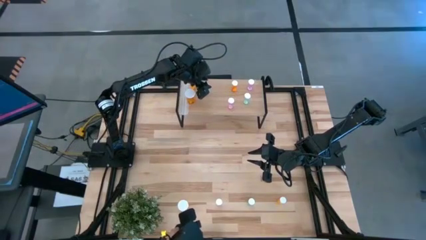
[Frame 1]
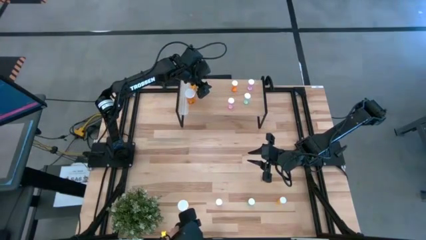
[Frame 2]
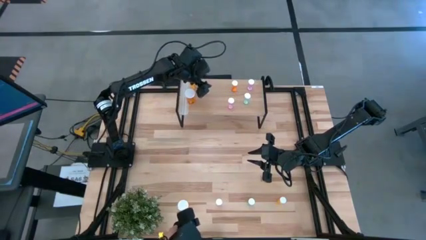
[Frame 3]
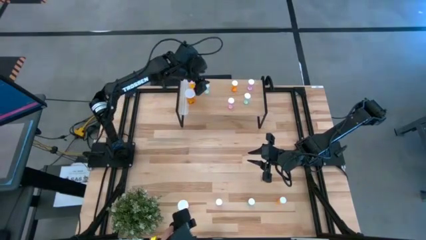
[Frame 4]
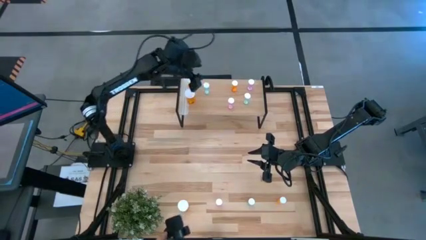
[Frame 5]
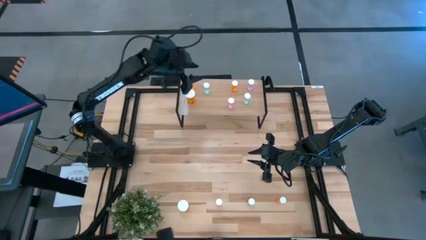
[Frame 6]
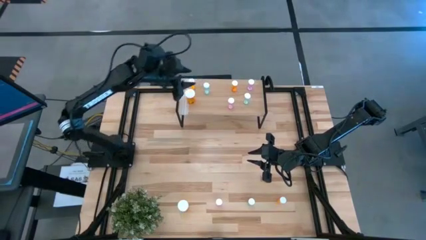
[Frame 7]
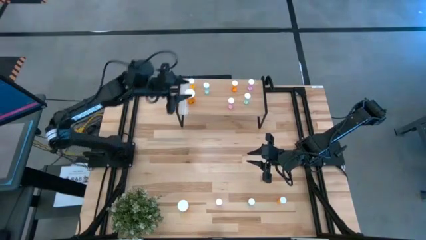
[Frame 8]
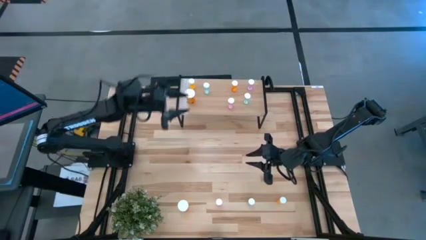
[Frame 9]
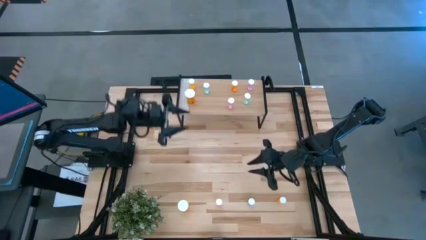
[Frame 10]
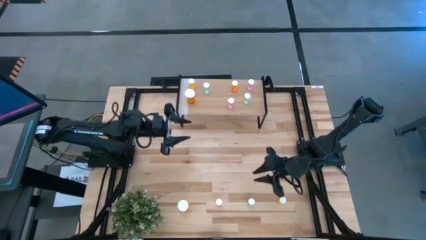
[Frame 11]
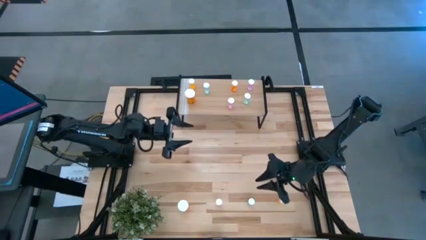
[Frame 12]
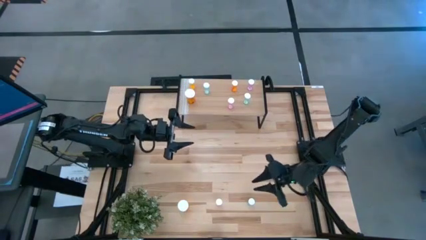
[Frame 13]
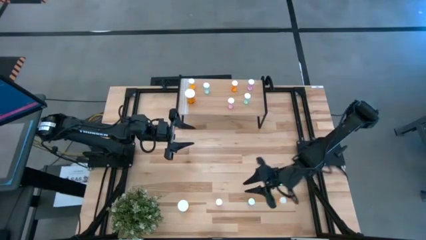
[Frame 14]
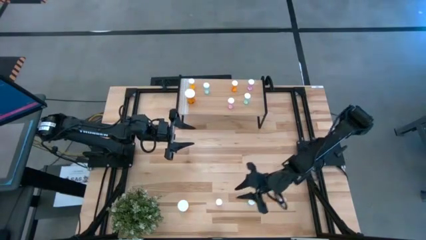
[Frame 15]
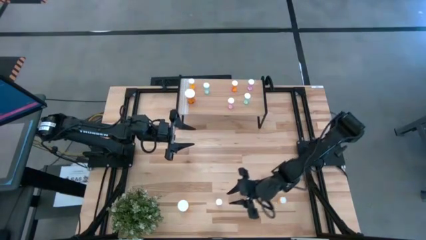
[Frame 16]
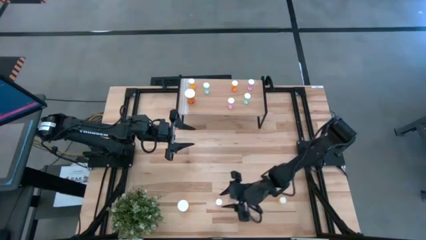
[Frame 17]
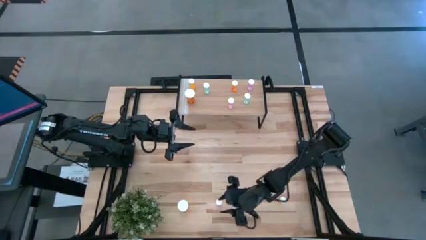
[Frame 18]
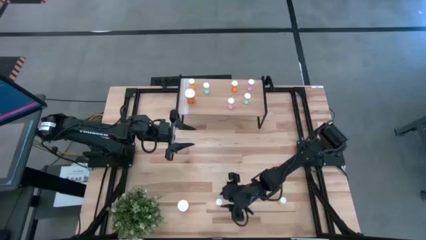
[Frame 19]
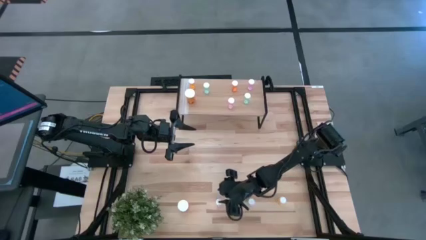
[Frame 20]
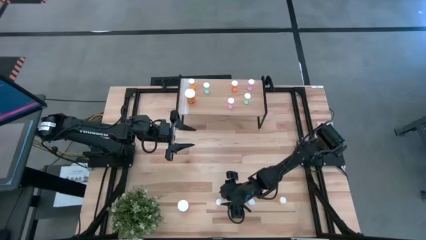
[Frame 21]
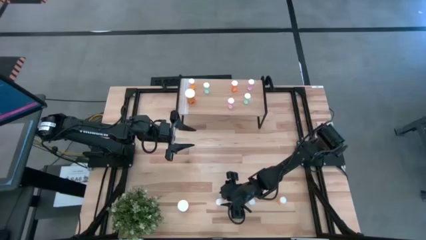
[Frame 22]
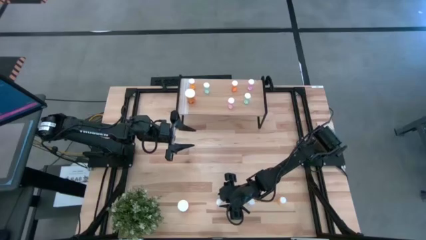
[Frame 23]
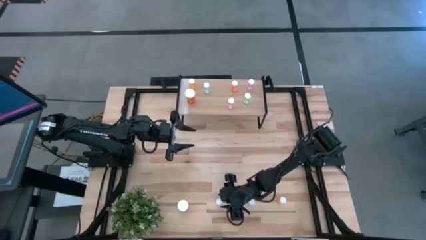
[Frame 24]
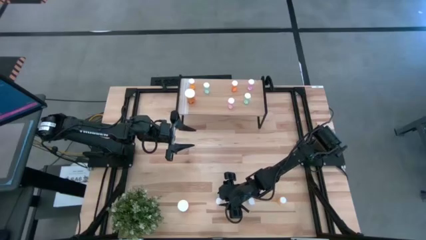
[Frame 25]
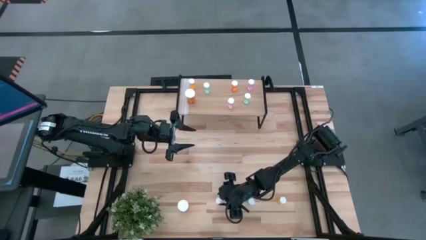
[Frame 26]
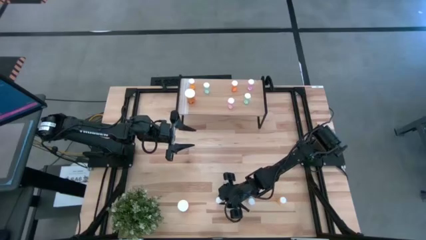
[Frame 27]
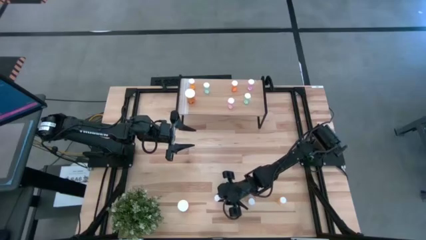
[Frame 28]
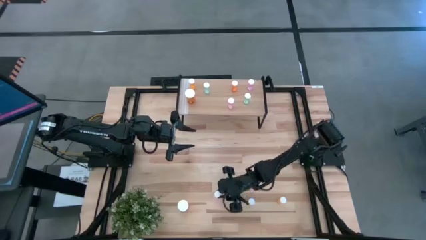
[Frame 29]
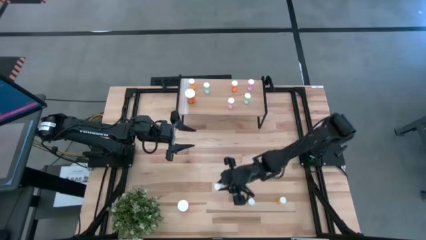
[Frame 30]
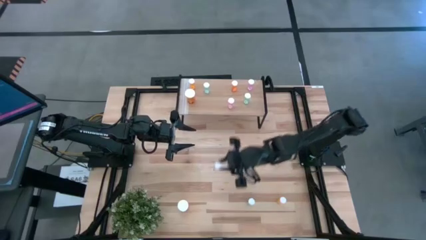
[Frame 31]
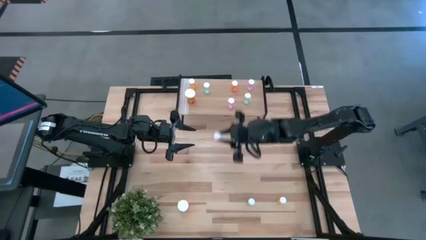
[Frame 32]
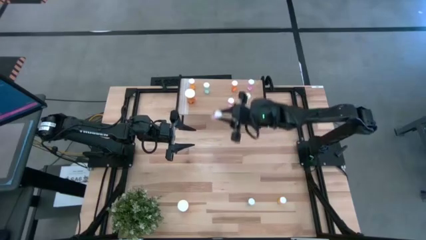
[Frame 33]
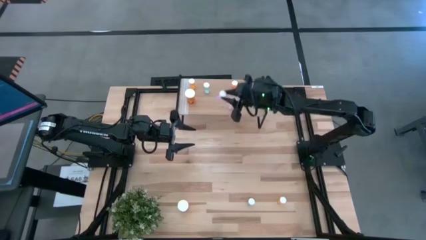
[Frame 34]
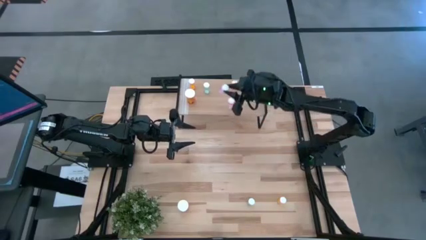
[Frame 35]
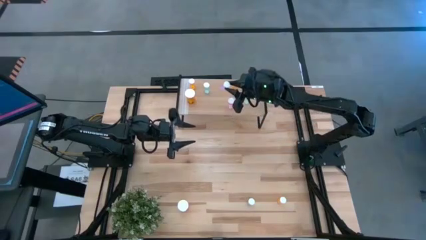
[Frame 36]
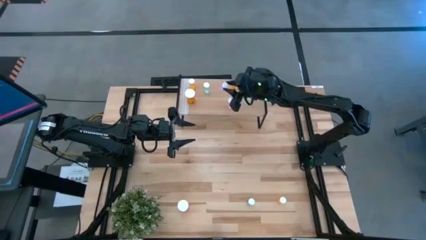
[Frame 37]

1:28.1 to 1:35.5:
Task: Pick and place medicine bottles onto shelf by color
Put the pink small pill bottle on the shelf

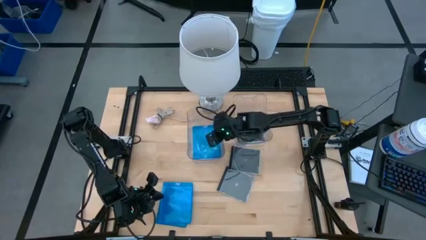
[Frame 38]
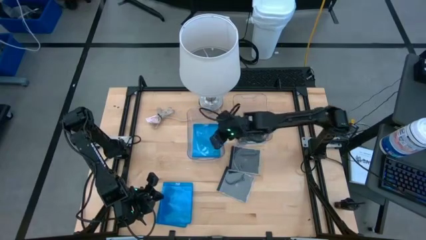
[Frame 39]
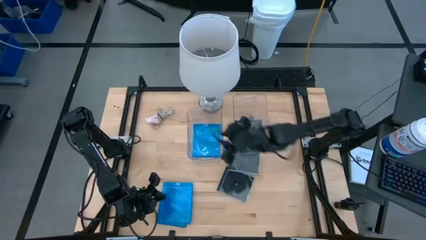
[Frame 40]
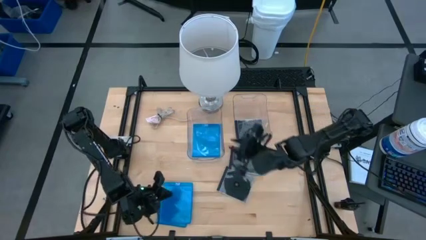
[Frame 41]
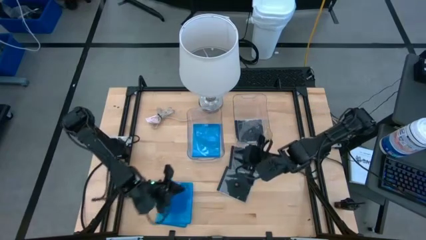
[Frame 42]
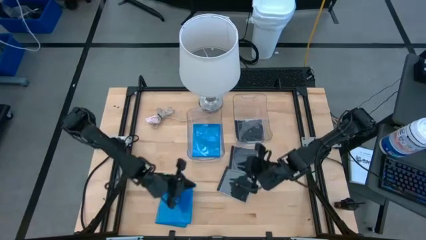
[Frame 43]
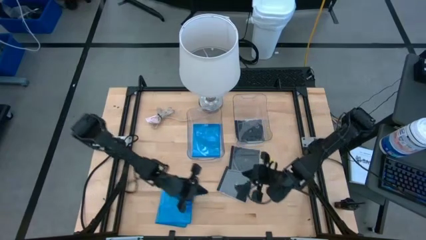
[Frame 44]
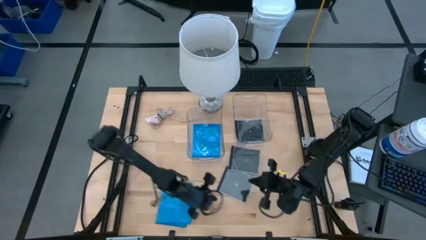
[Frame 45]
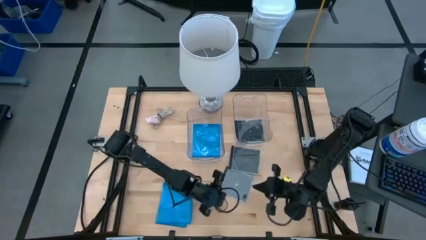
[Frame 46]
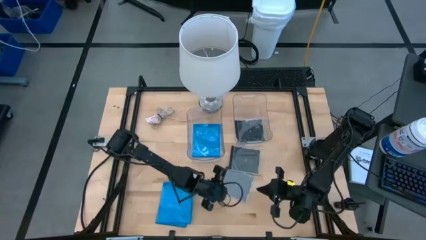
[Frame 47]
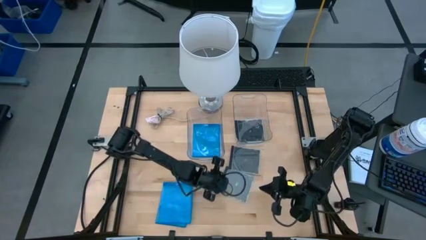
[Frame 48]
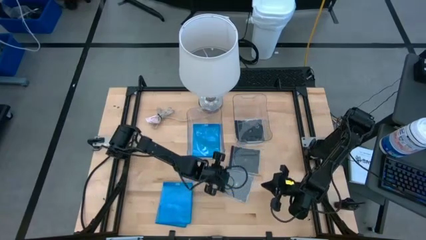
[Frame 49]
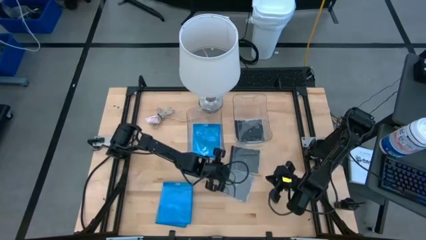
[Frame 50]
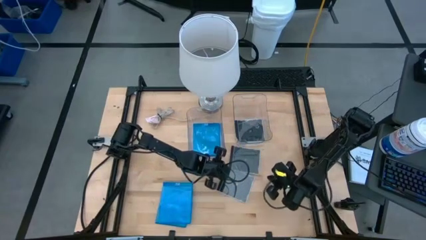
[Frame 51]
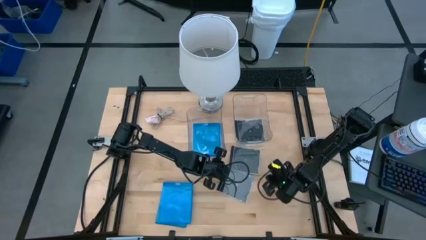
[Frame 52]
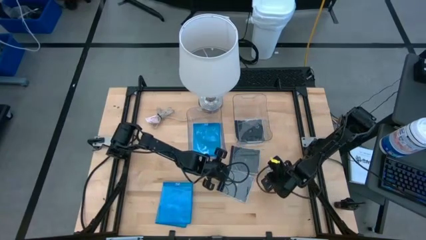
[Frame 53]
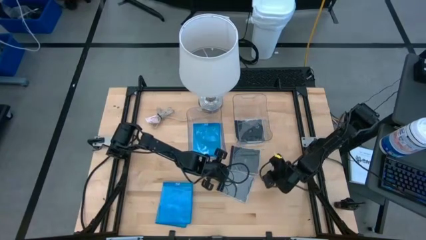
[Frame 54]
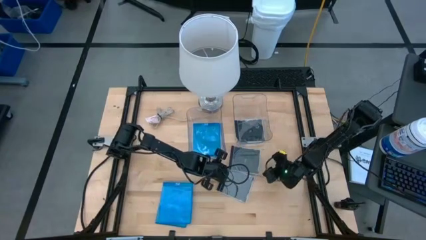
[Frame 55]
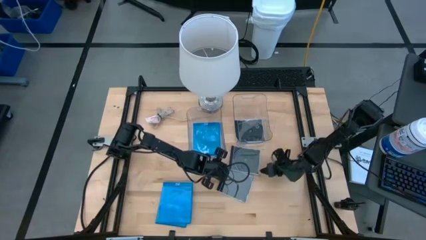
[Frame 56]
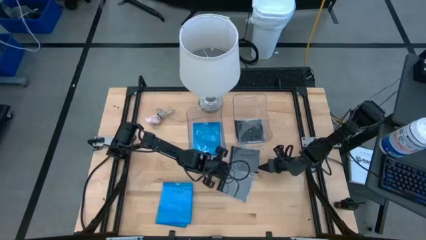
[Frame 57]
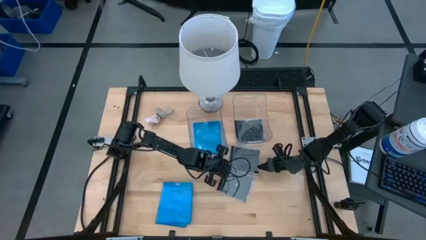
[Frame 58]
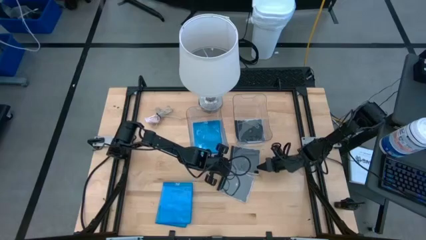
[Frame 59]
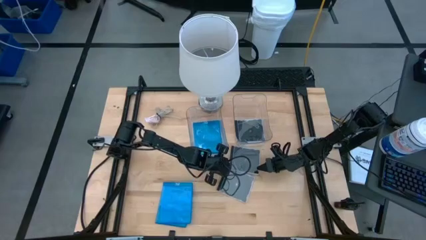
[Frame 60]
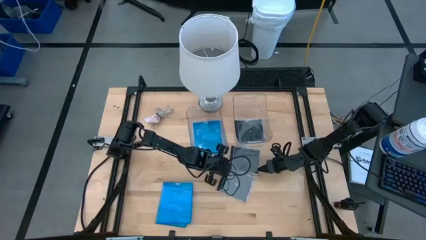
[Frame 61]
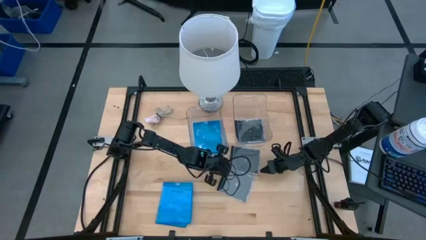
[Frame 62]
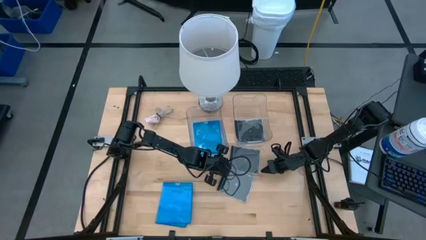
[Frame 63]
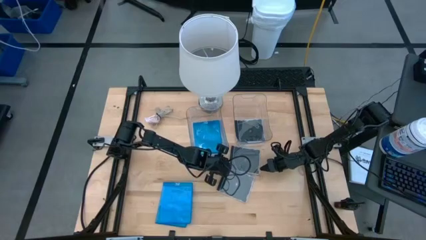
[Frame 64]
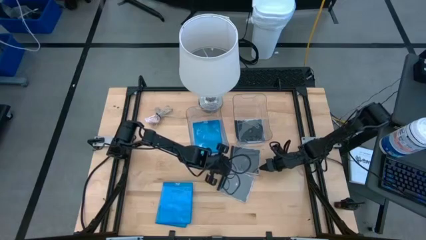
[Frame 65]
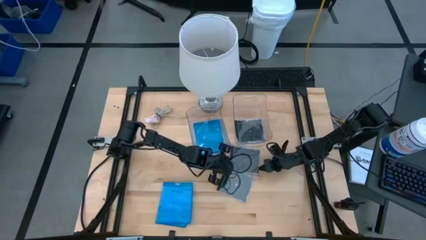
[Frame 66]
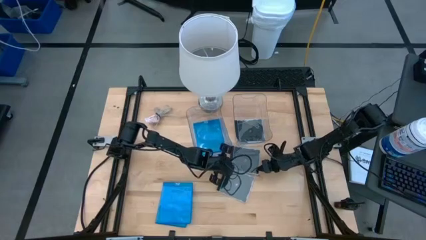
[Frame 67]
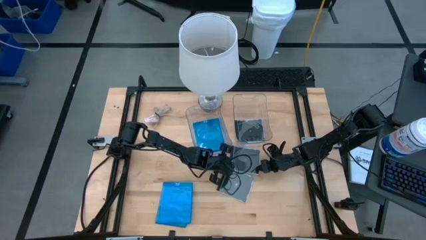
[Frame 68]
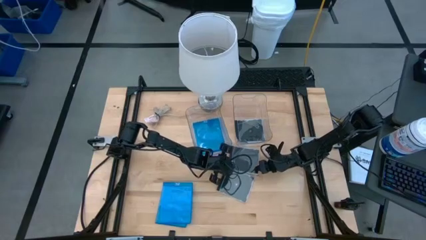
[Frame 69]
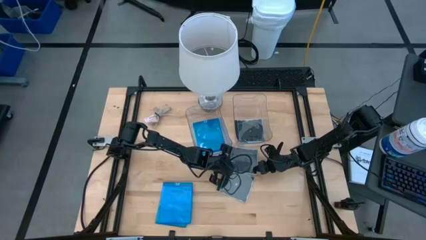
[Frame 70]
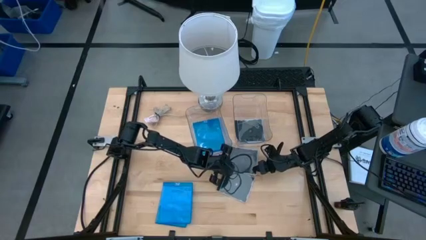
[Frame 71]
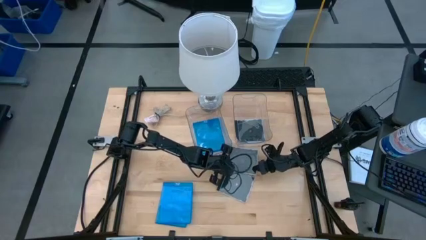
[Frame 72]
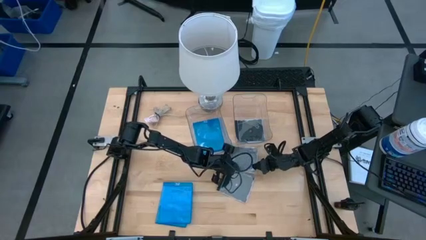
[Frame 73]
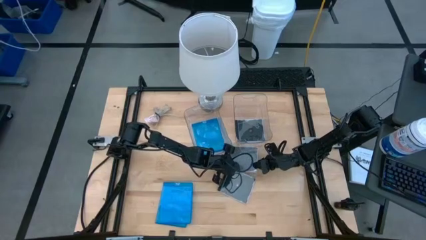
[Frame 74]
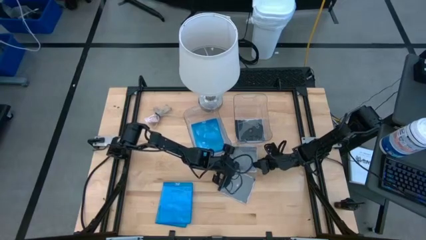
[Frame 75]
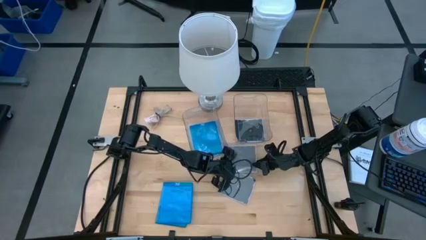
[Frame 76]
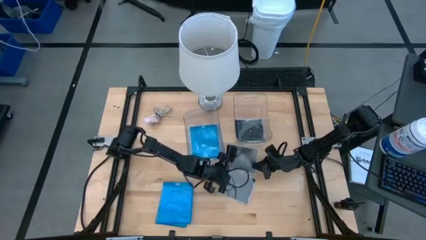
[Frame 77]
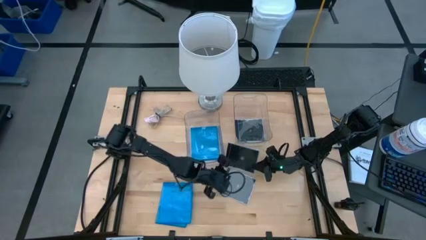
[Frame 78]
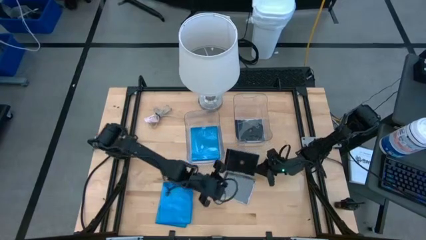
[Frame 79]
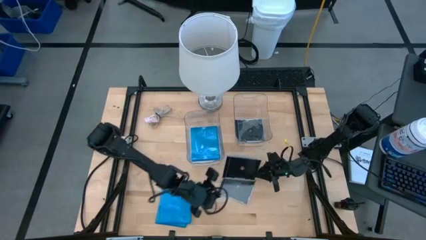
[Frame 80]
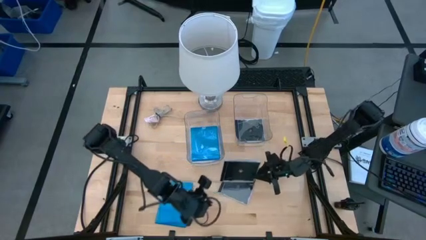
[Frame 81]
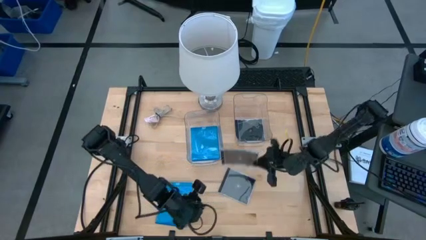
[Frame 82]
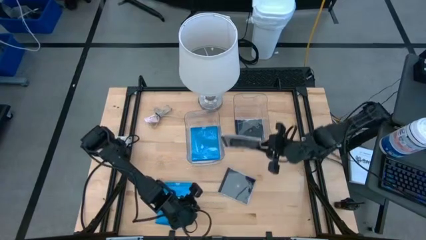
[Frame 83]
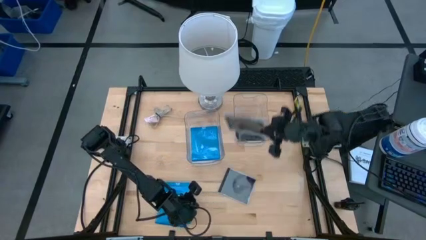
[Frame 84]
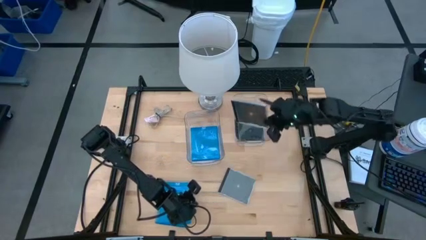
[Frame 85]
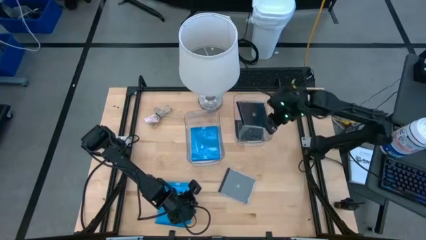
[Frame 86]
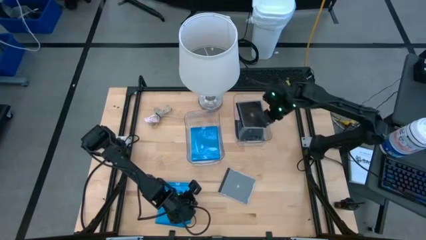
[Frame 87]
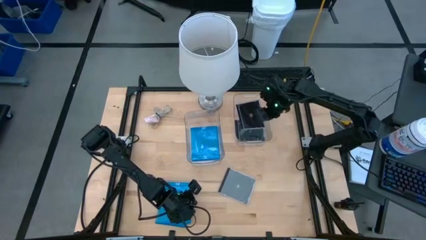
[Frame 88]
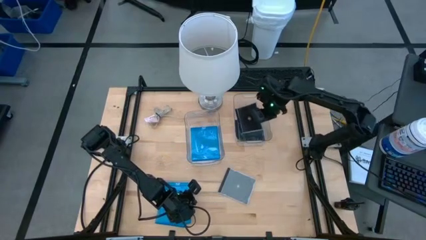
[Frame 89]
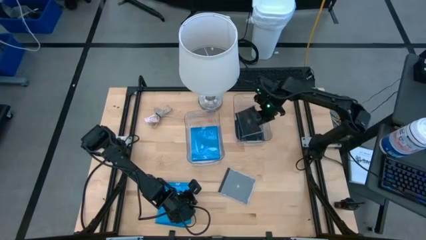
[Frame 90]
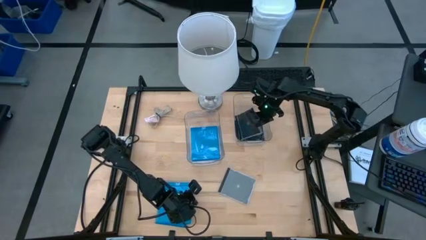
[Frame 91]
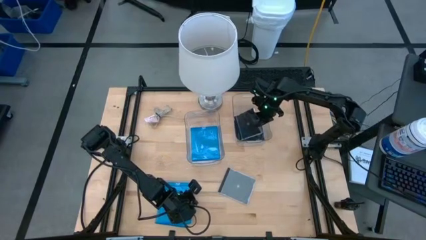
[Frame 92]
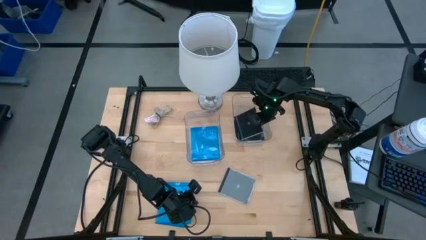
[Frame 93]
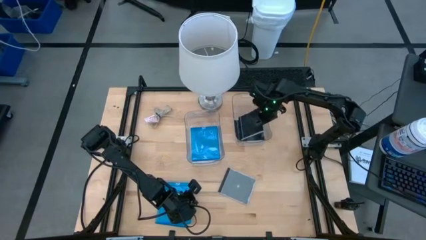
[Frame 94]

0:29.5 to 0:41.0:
Task: Pick & place jewel cases by type
Put the black cd case into the right transparent bin
